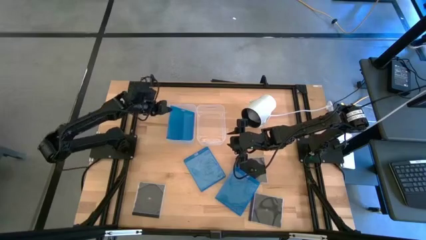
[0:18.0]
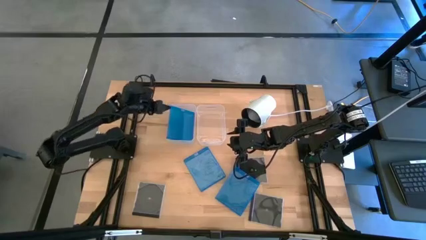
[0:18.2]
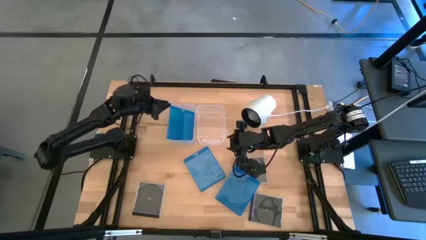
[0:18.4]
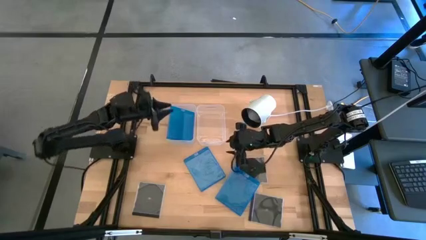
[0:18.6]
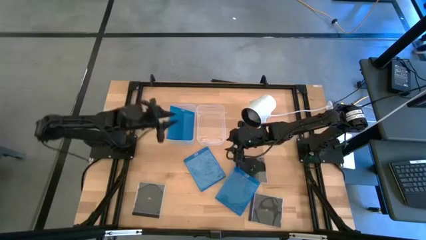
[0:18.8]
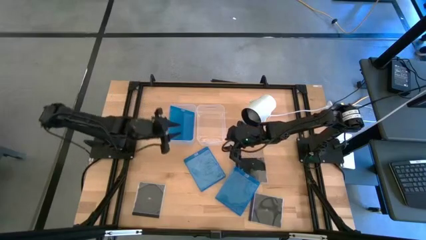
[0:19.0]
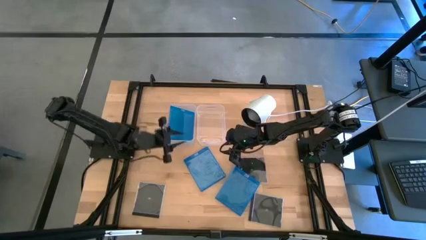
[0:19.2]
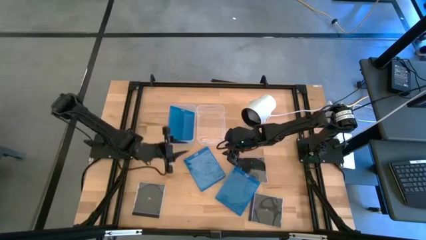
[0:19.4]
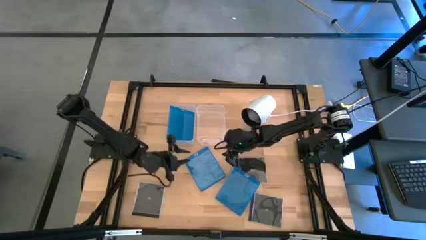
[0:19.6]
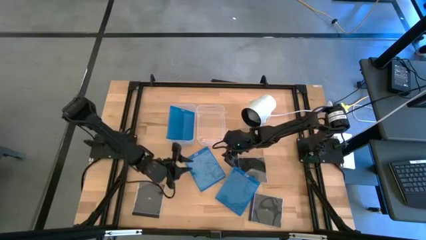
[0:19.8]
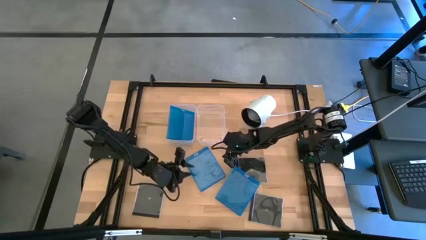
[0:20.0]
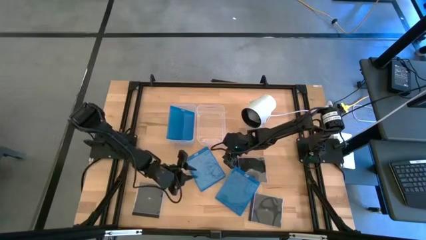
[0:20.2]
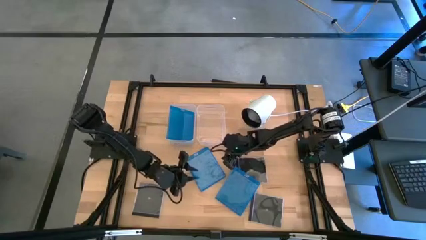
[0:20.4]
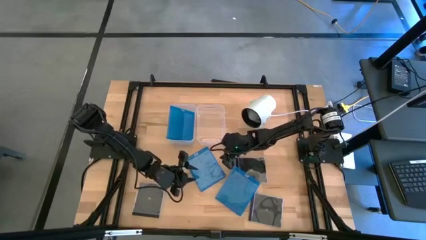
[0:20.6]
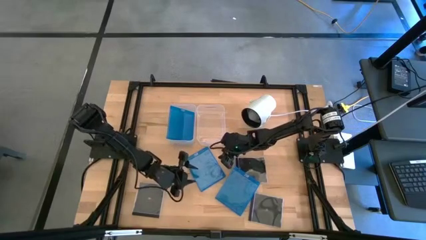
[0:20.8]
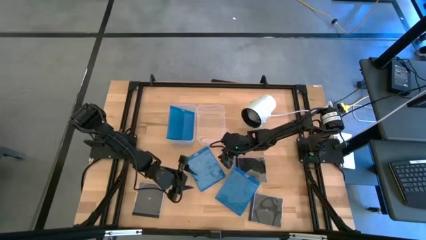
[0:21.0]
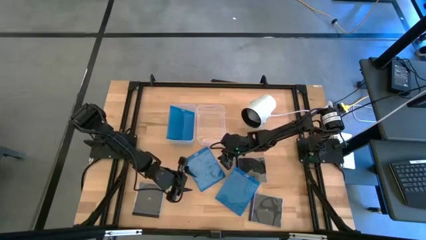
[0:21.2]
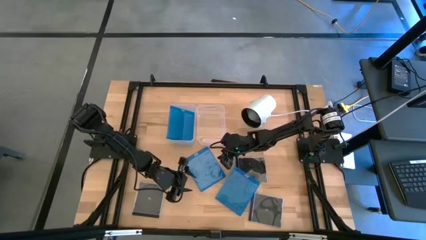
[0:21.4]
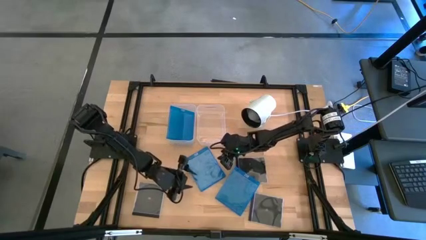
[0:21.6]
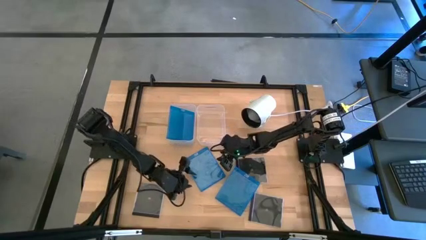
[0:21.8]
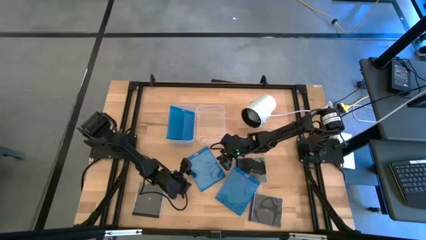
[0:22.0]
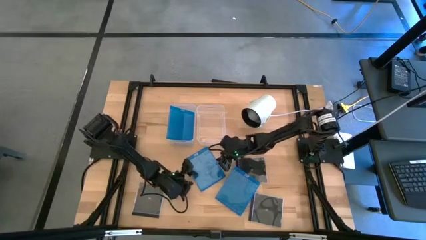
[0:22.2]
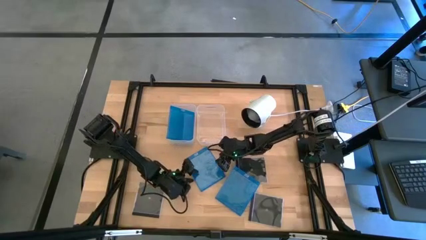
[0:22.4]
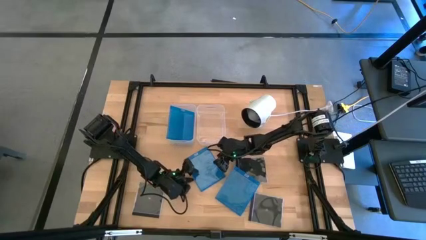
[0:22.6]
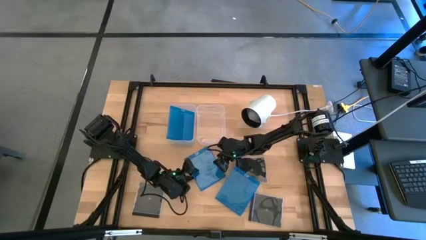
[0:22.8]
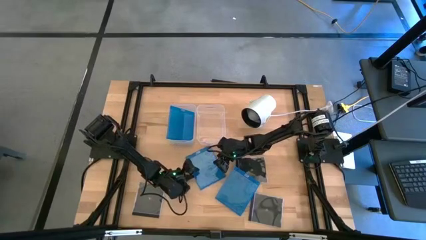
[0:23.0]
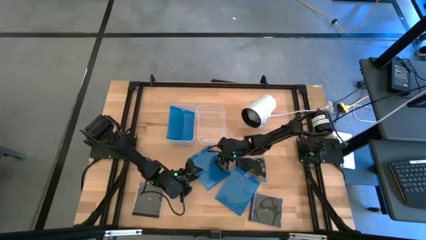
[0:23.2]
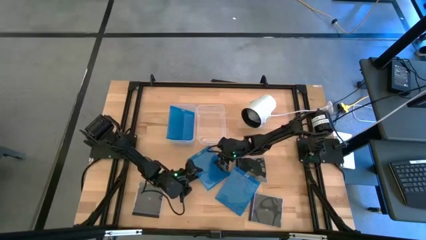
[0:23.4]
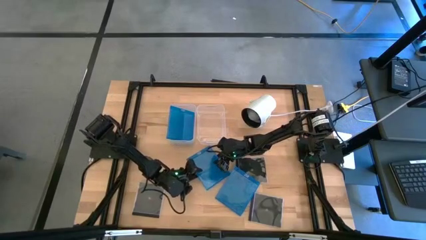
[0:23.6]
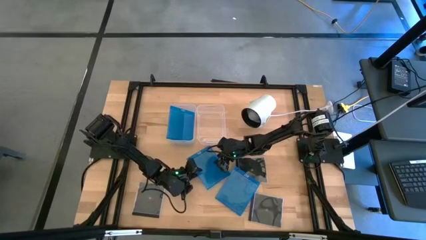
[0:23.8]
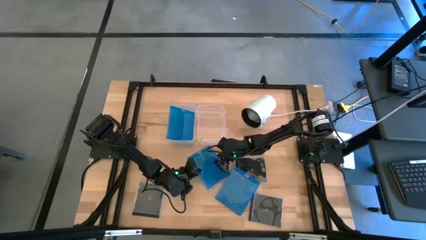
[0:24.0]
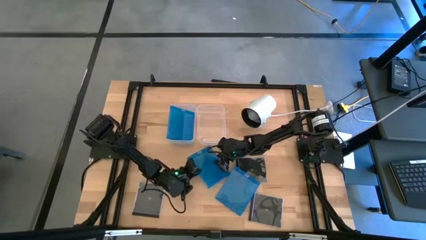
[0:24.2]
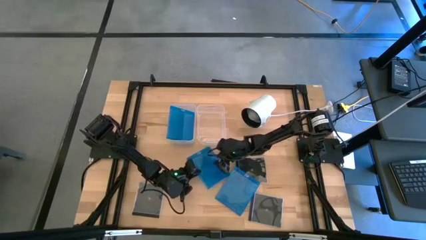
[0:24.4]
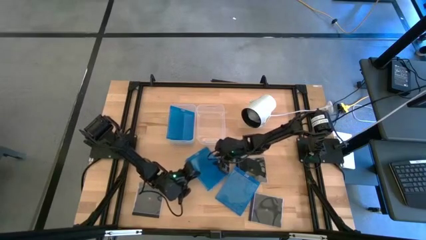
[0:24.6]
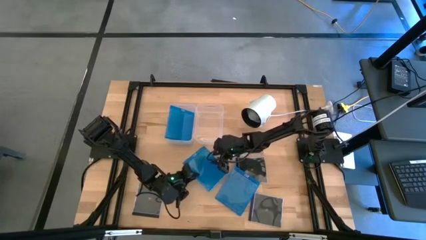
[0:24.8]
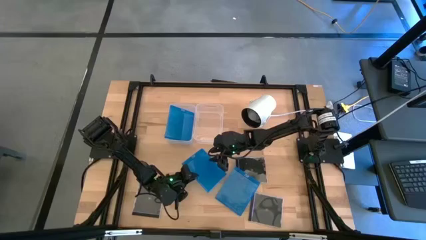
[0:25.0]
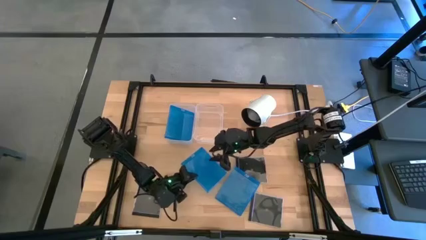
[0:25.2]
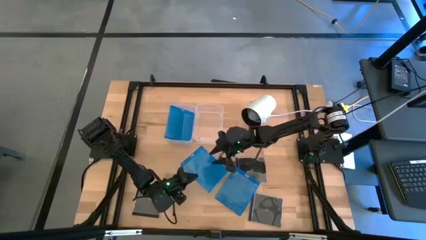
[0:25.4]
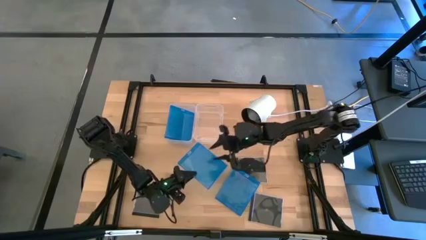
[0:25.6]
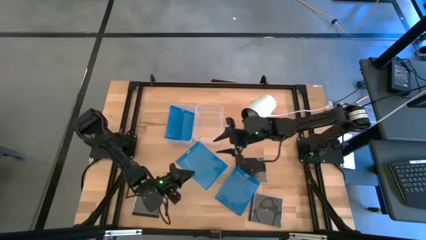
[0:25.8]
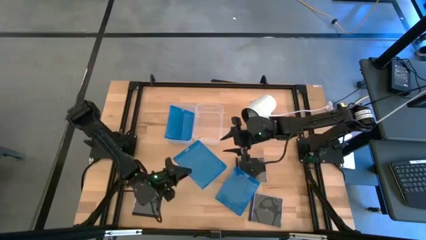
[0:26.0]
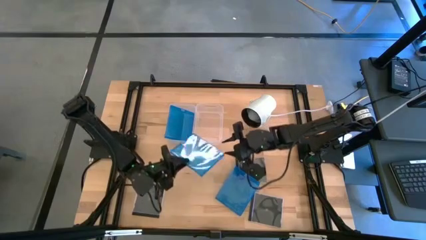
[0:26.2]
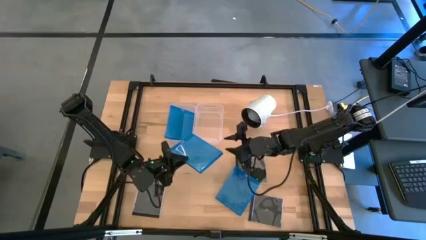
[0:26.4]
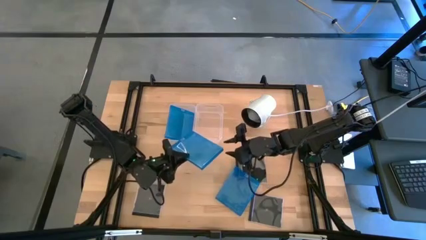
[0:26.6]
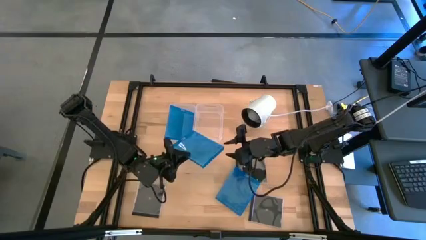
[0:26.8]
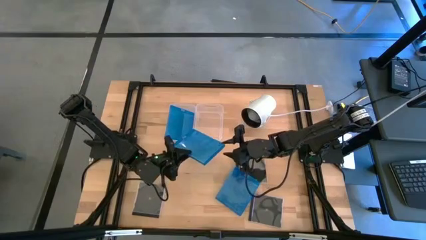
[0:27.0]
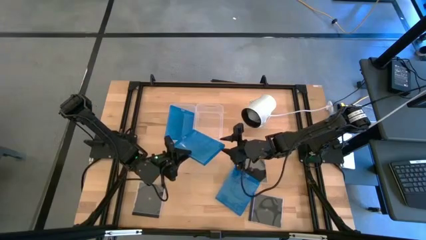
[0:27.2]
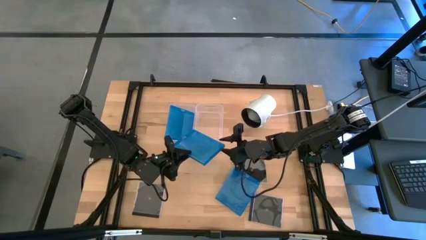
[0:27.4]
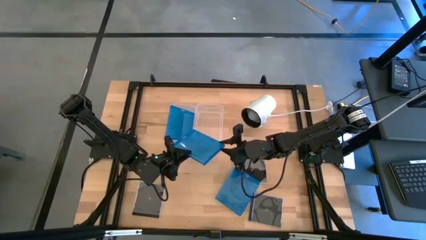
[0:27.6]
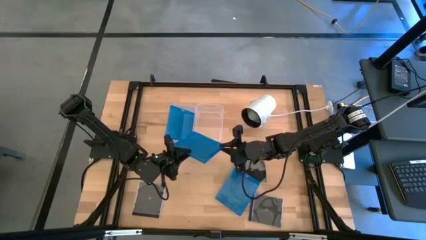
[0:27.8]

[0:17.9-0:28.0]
Task: Pick & place jewel cases by type
Put the left blue cd case into the left transparent bin

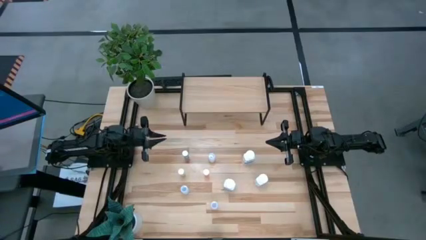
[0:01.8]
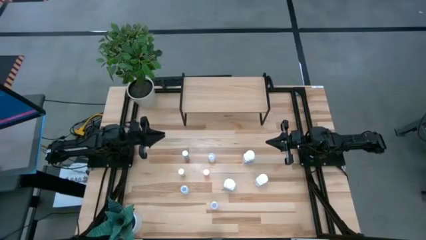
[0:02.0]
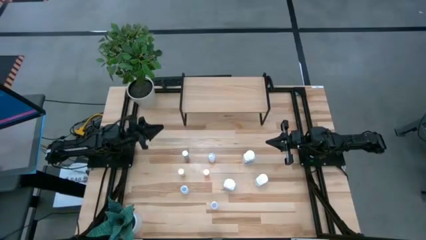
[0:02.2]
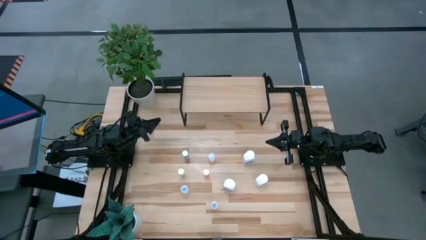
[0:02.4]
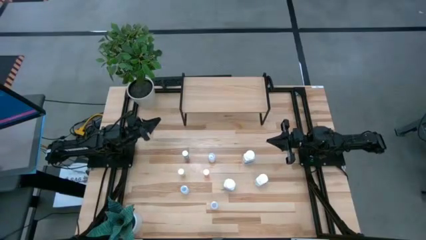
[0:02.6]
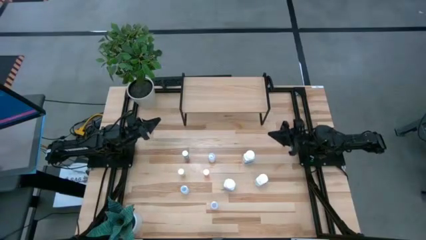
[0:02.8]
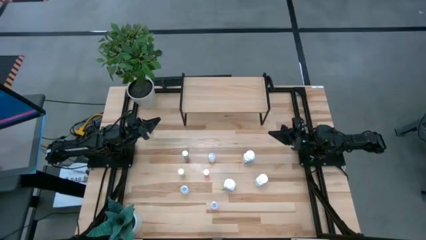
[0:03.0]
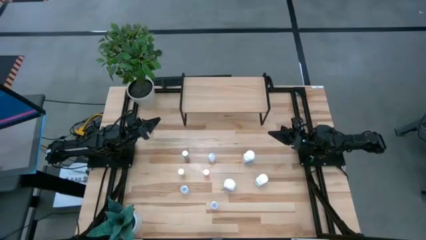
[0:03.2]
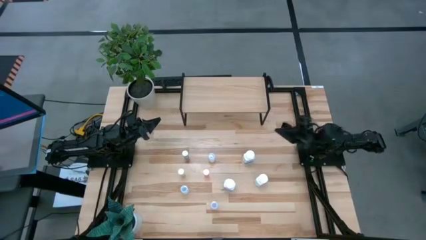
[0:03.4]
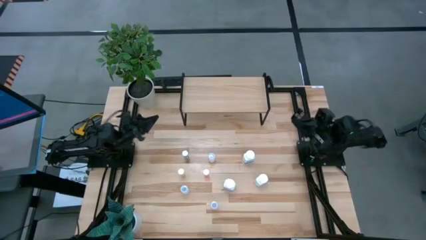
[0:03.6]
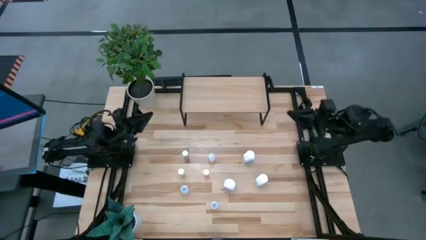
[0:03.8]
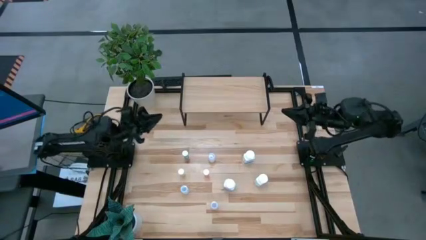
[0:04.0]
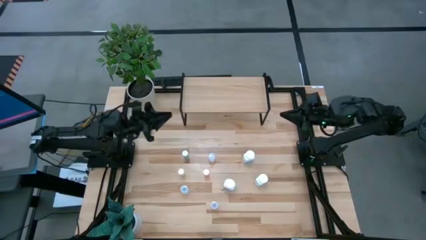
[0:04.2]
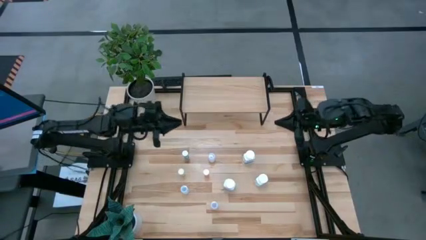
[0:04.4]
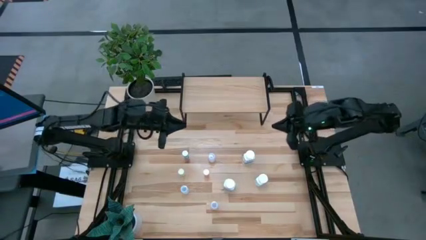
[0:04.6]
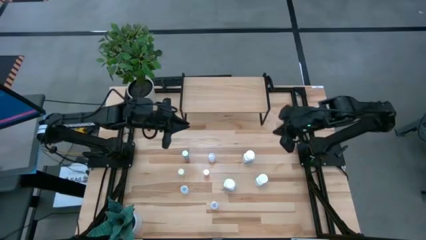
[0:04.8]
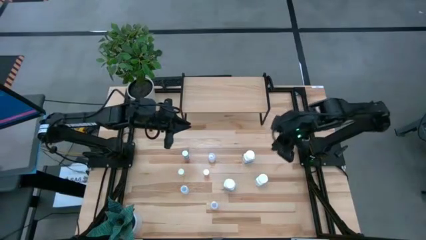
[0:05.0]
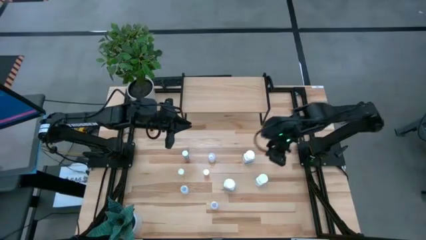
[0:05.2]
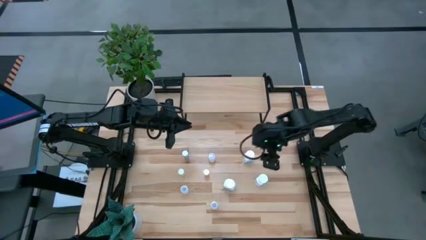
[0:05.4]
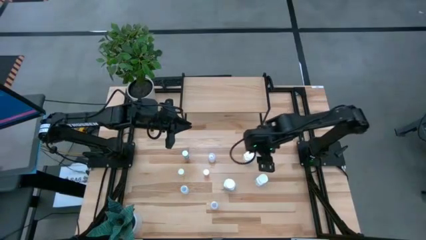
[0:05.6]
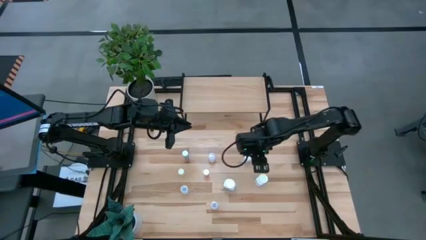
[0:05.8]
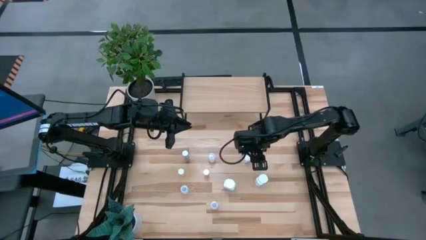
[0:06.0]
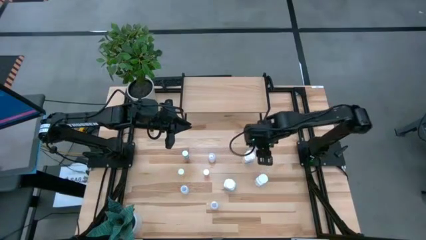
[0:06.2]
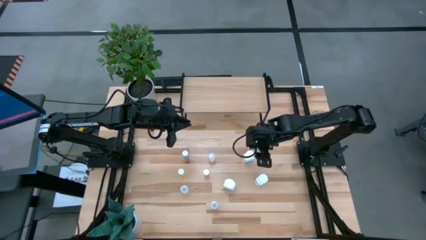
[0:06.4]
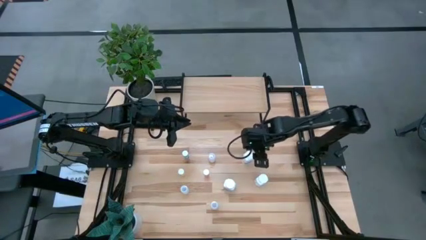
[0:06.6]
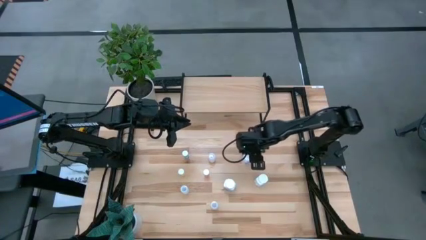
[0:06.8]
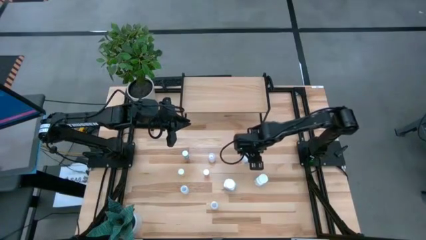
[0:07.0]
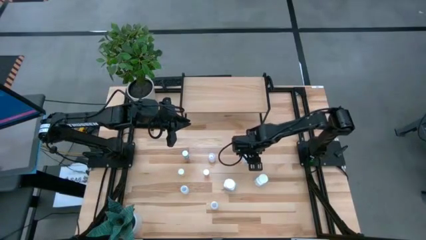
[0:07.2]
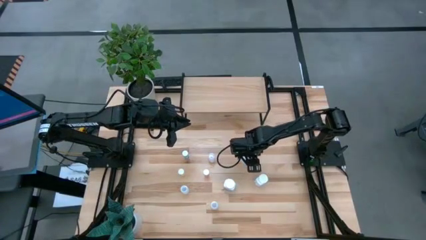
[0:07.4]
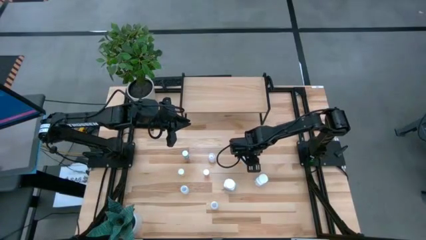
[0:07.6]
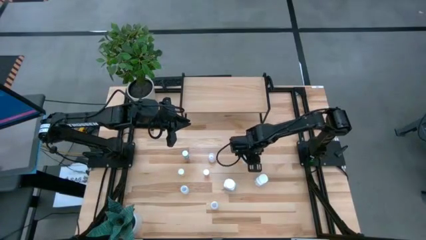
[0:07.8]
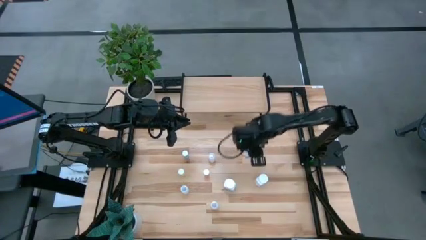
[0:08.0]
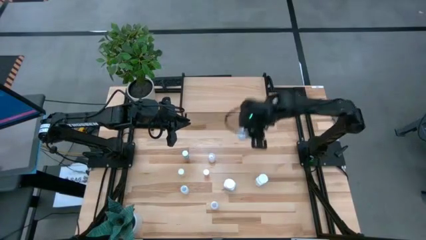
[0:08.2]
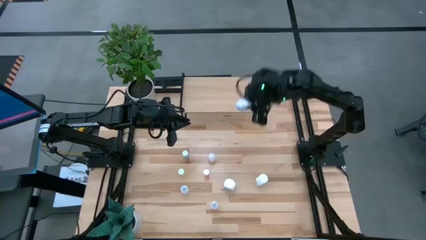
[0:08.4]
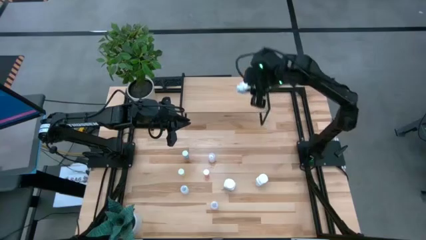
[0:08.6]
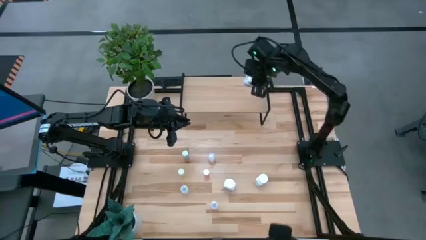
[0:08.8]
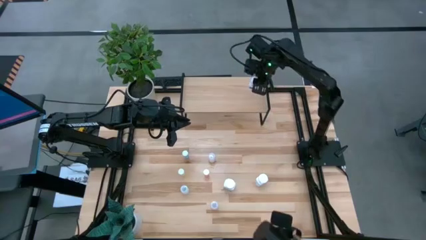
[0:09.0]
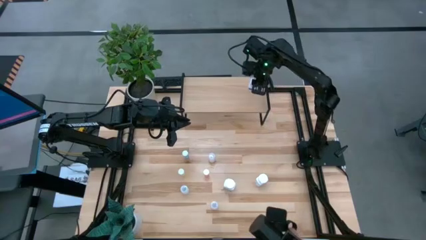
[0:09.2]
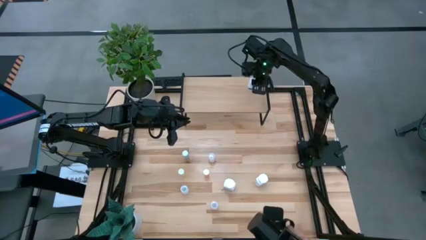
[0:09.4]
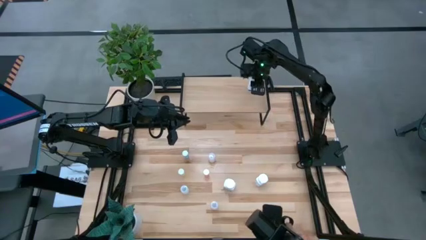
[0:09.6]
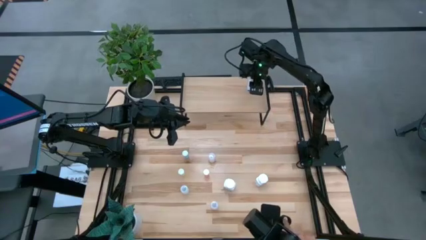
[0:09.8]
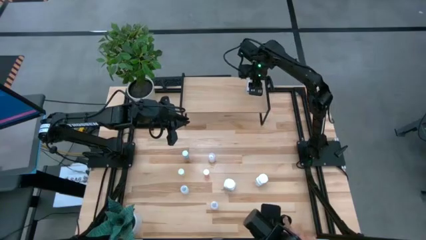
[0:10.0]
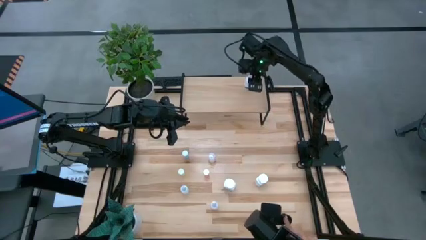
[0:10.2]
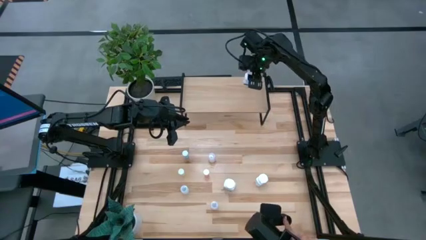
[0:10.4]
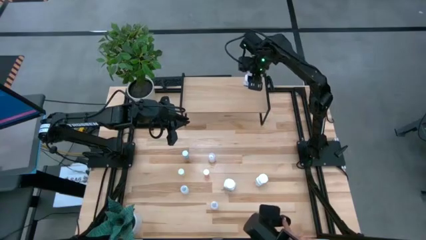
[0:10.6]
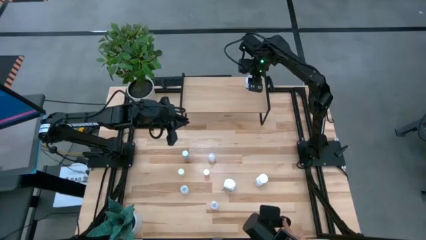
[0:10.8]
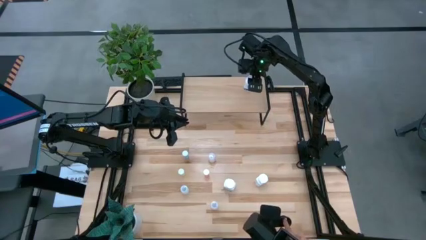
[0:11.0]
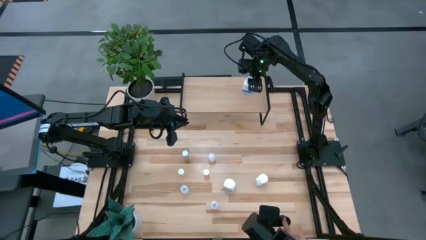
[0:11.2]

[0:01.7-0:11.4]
Task: Pick and place medicine bottles onto shelf by color
Put the top right white, blue pill bottle on the shelf
